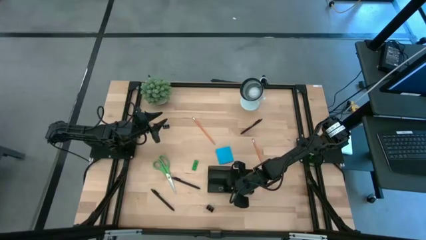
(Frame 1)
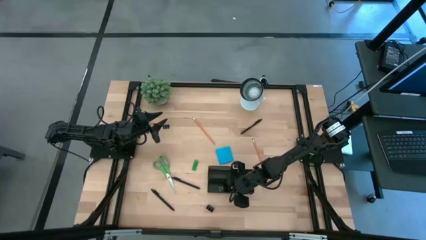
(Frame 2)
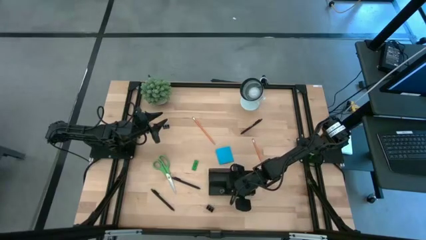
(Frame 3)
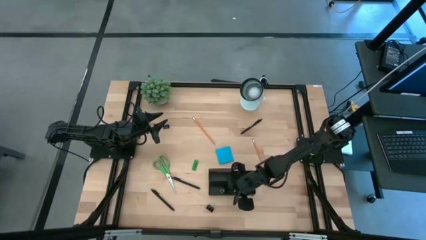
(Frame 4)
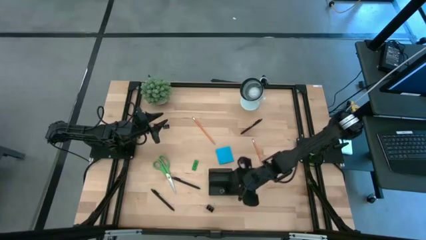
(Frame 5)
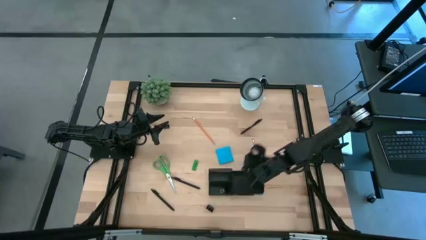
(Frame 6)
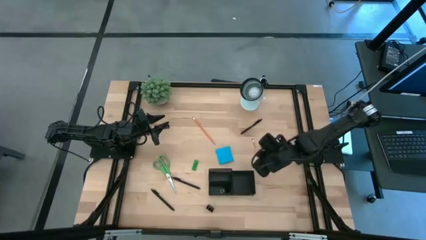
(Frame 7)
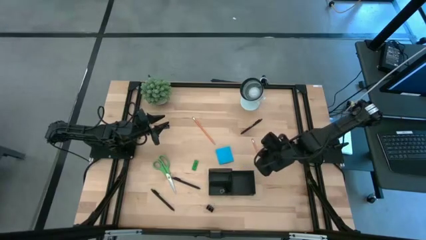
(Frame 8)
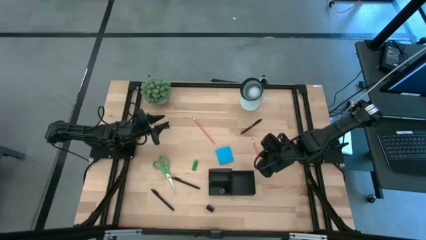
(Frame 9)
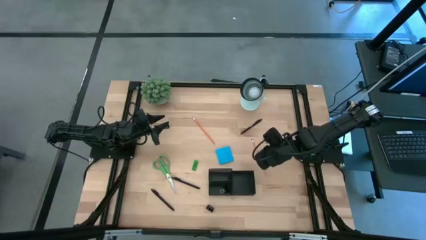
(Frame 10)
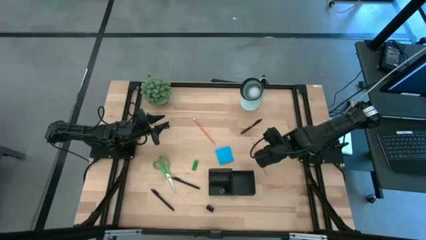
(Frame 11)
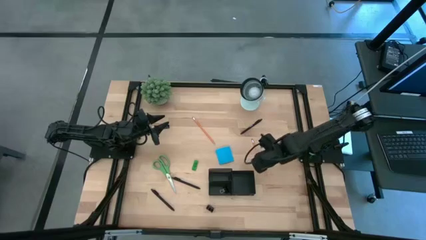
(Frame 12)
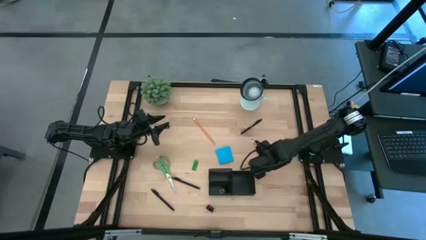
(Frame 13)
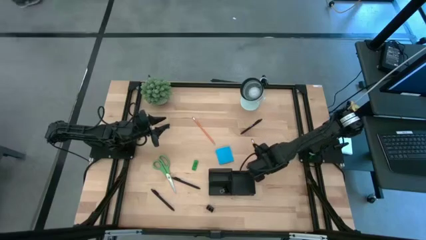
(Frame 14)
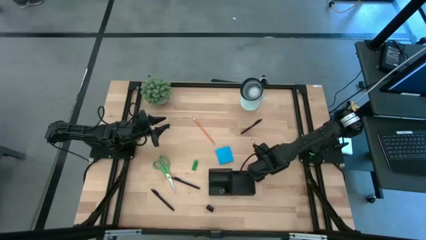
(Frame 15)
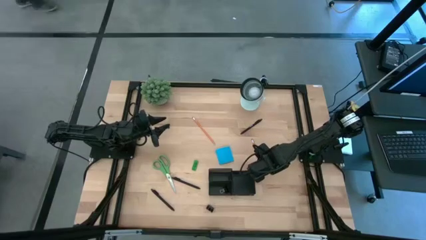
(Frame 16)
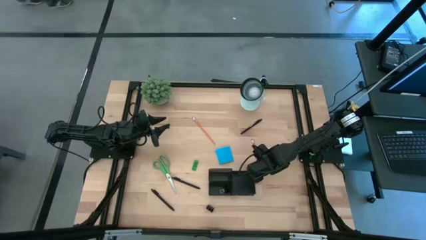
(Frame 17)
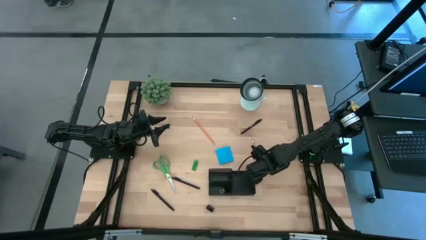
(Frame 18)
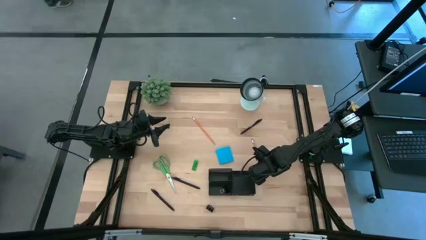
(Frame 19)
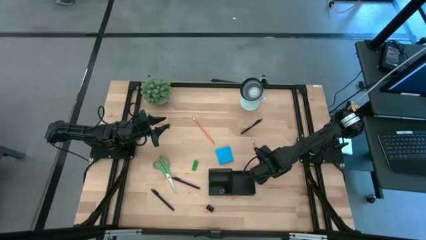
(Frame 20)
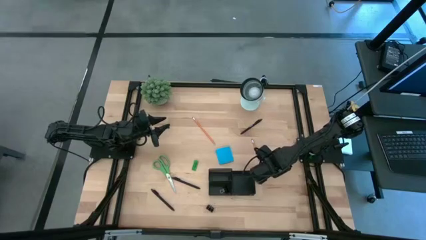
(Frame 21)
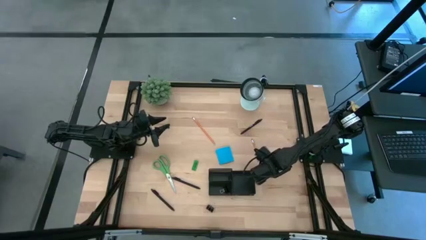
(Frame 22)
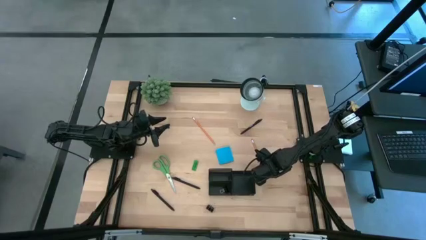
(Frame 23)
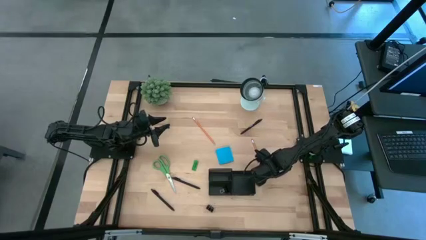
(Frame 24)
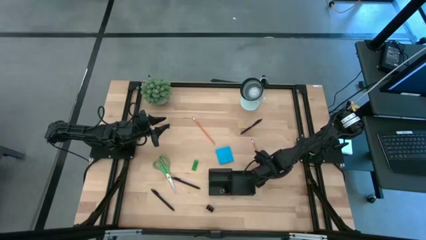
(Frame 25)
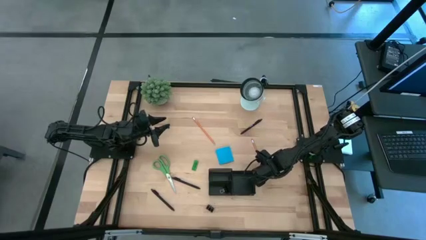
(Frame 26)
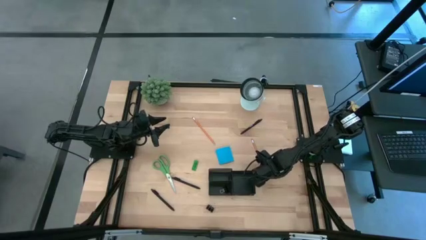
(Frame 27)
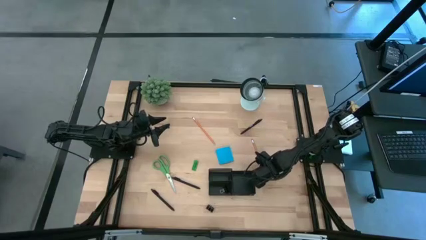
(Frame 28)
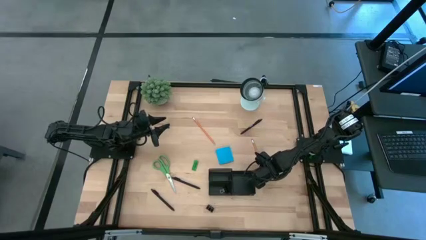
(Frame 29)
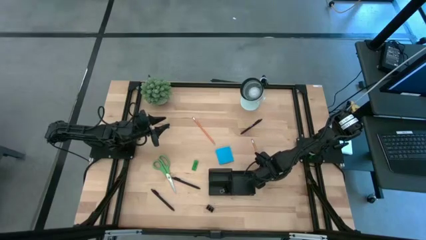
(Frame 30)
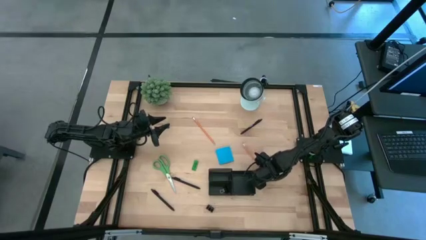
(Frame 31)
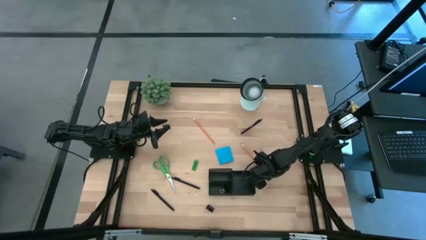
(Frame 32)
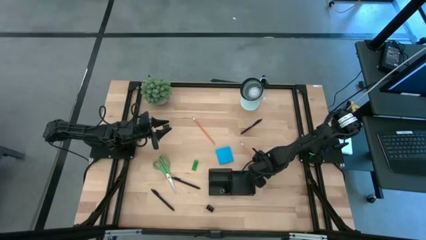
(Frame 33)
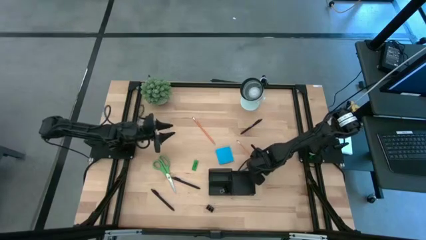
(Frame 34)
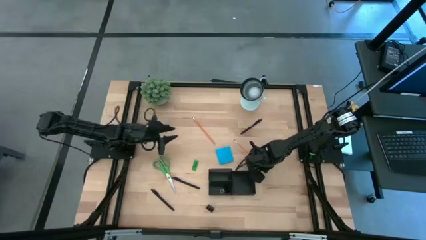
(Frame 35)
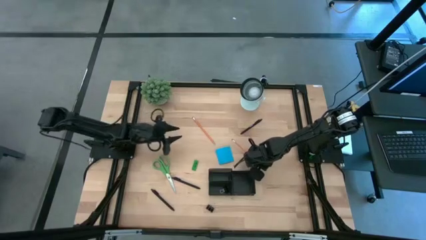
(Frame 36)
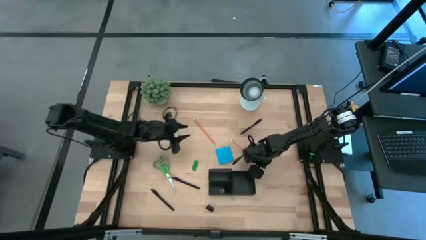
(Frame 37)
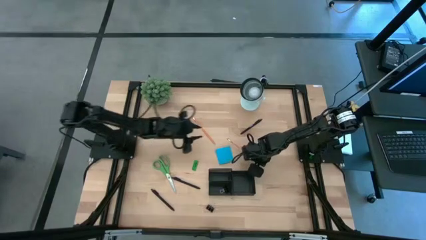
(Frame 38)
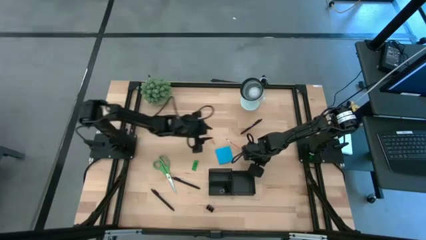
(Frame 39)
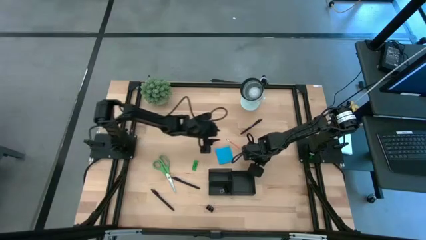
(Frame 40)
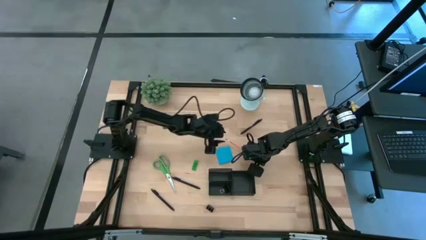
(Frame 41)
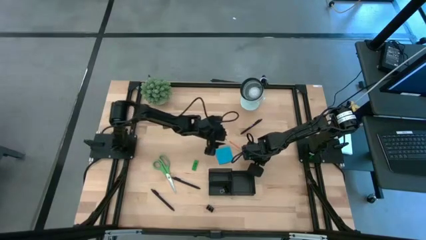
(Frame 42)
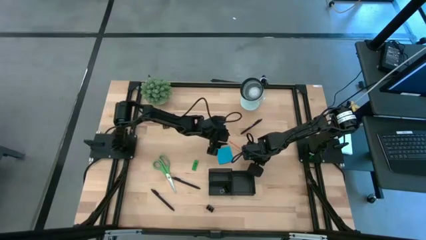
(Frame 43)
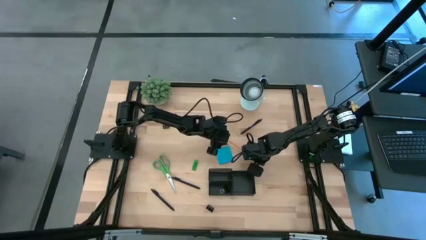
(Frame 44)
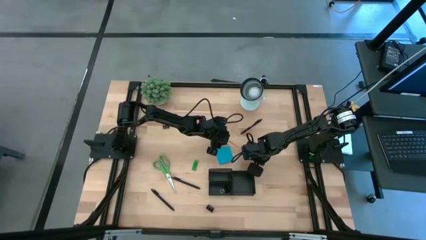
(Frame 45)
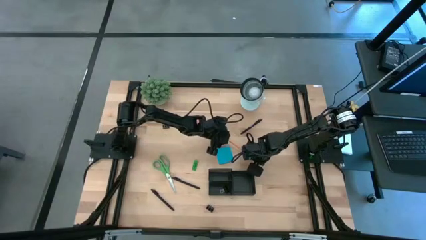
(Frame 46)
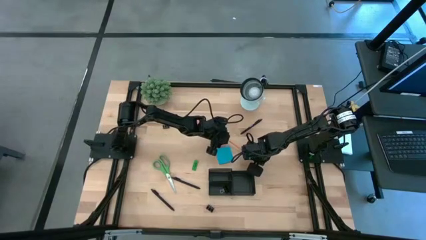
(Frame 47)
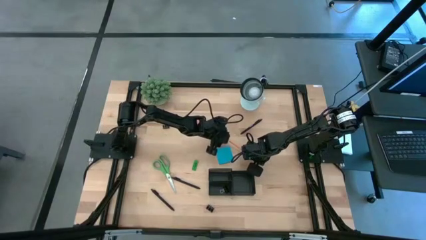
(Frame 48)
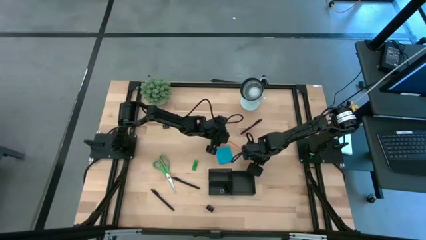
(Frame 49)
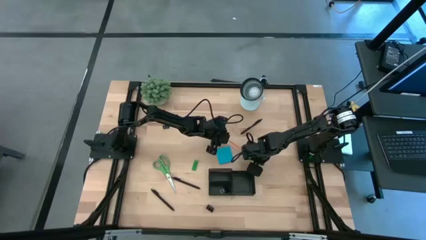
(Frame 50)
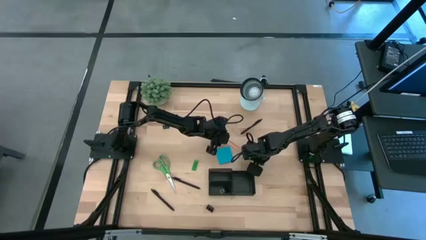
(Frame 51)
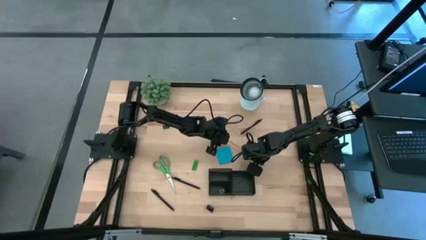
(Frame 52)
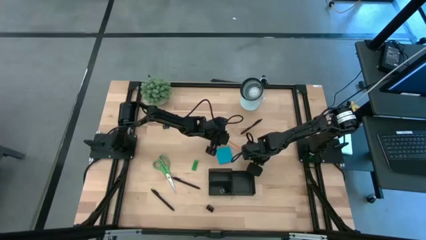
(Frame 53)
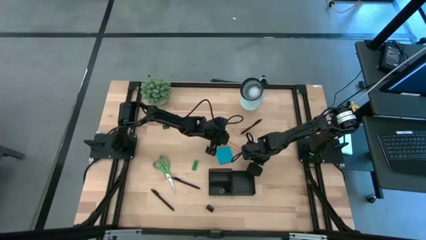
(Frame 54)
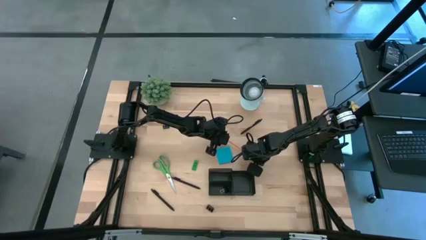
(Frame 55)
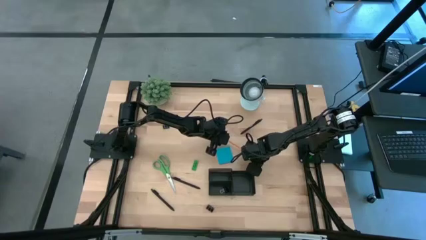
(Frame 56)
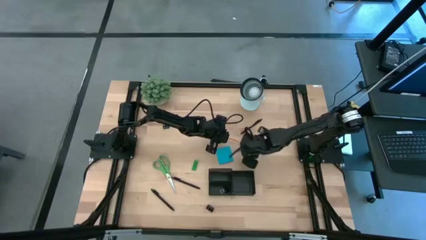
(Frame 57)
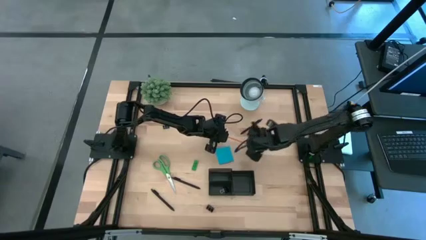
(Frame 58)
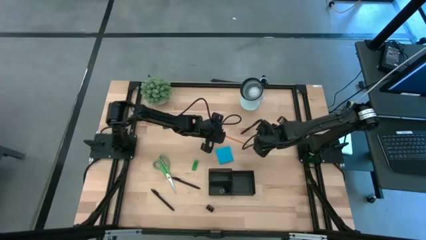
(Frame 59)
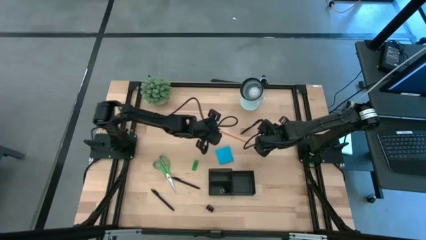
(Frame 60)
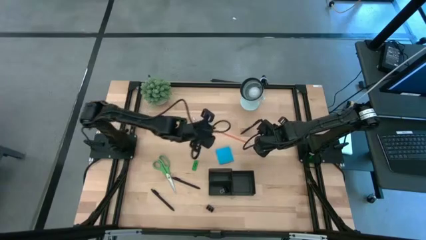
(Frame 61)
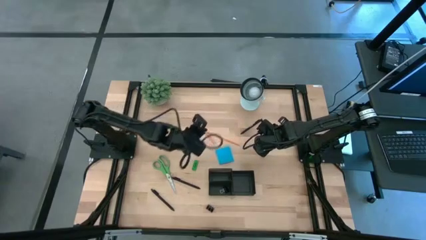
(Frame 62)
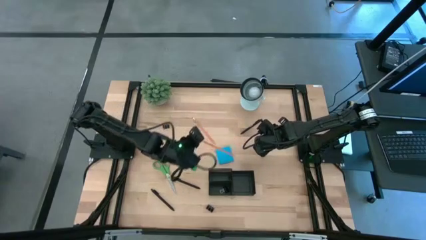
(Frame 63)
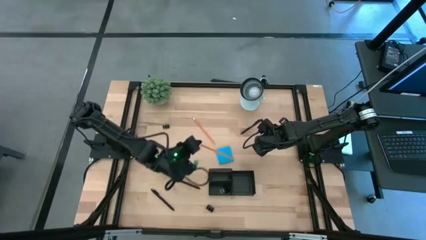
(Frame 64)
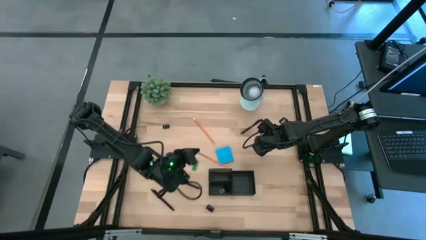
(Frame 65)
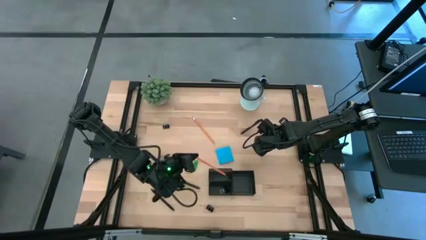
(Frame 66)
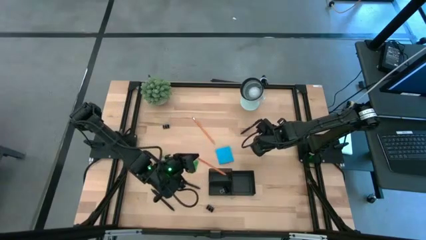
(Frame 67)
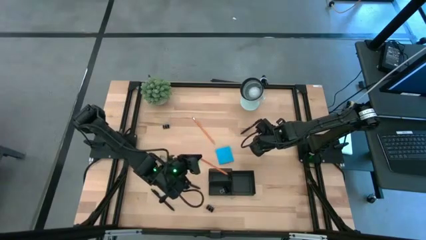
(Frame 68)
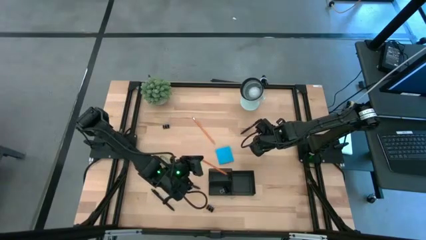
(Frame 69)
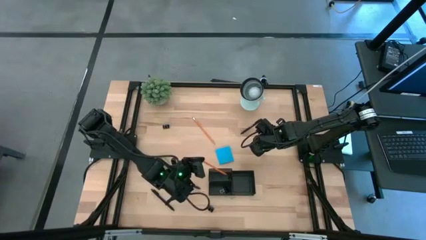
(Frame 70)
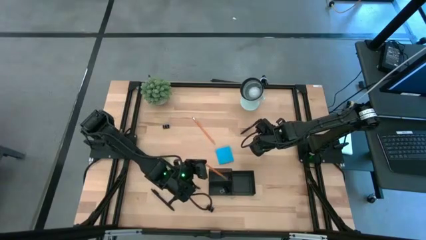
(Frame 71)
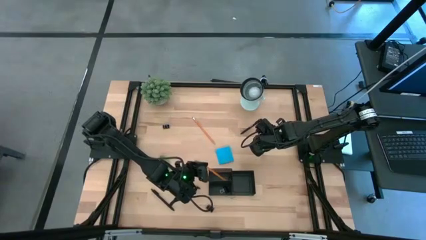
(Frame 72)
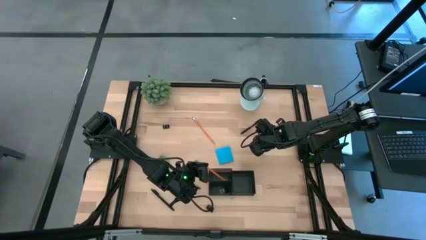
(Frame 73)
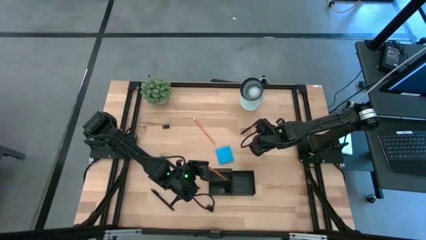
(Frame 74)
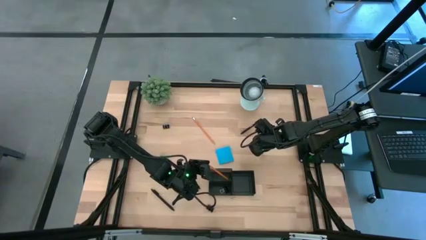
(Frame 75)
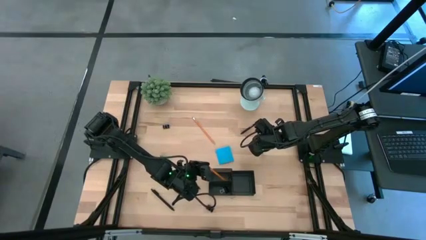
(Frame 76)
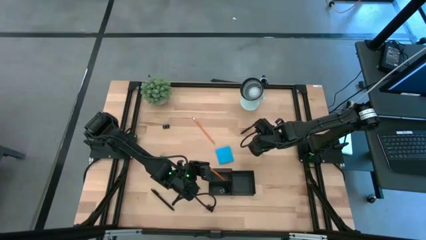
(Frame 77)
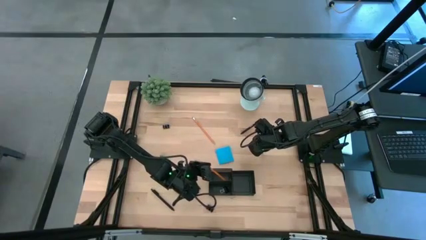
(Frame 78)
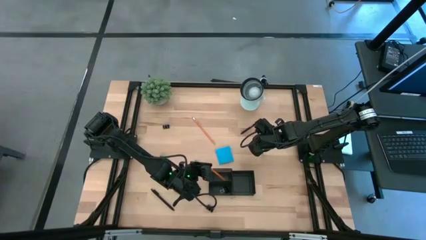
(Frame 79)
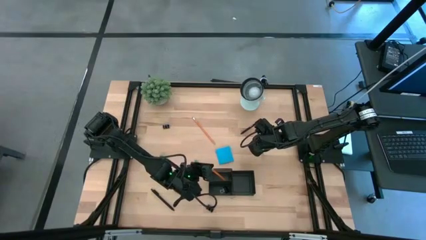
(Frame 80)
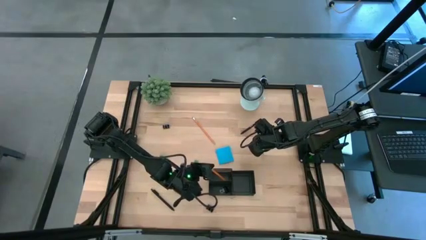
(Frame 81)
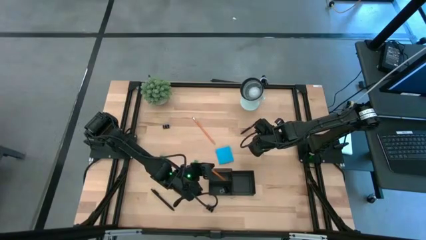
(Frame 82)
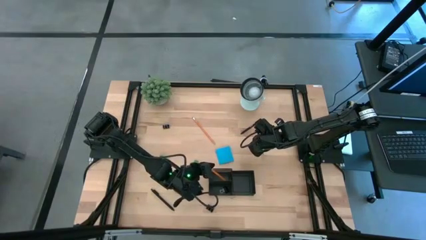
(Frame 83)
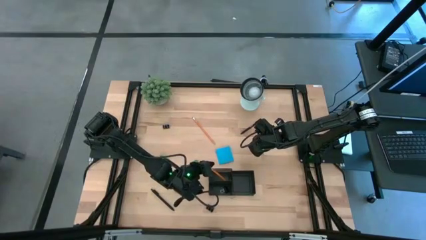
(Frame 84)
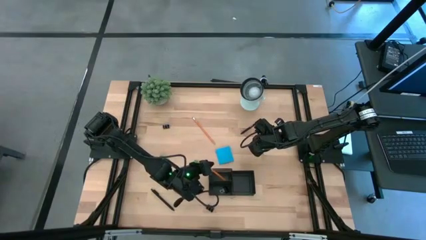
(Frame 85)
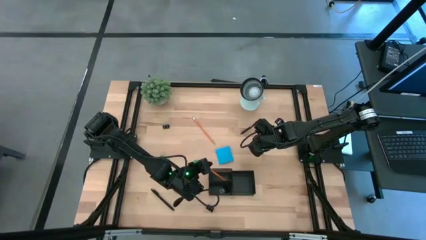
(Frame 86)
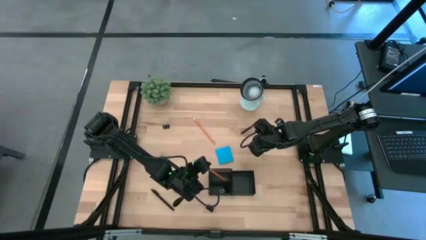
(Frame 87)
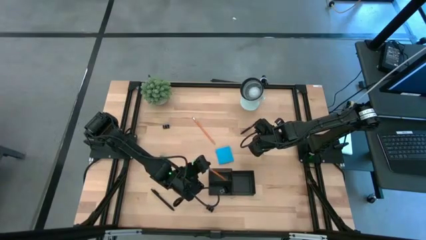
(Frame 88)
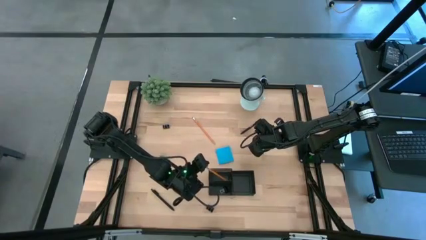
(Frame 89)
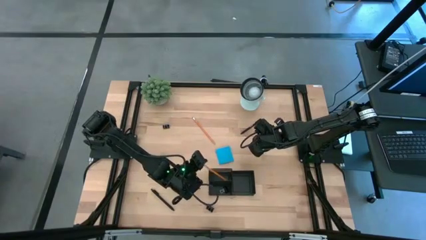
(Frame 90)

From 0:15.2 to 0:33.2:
Task: Pick and place office supplies into organizer
Put the right pencil into the top left slot of the desk organizer
